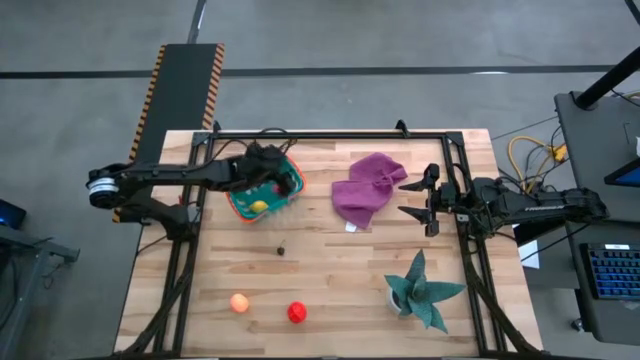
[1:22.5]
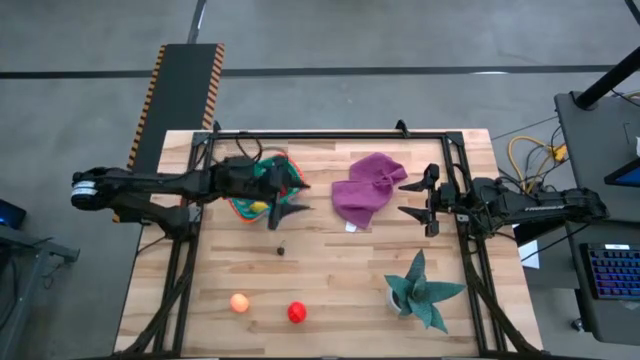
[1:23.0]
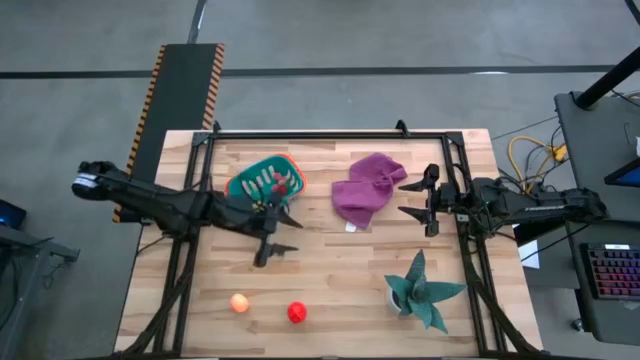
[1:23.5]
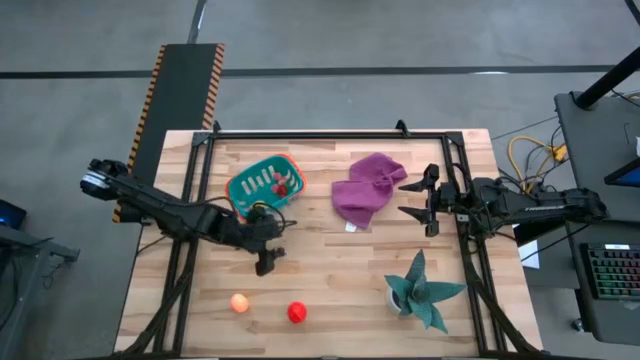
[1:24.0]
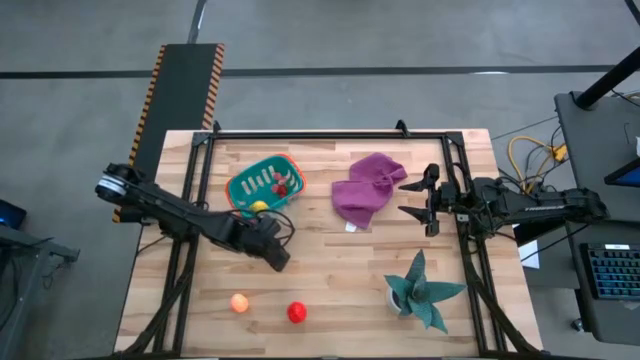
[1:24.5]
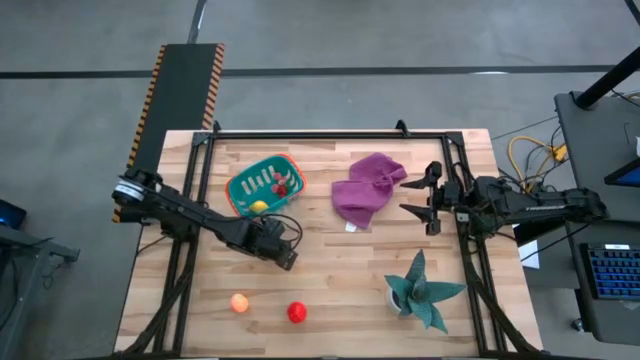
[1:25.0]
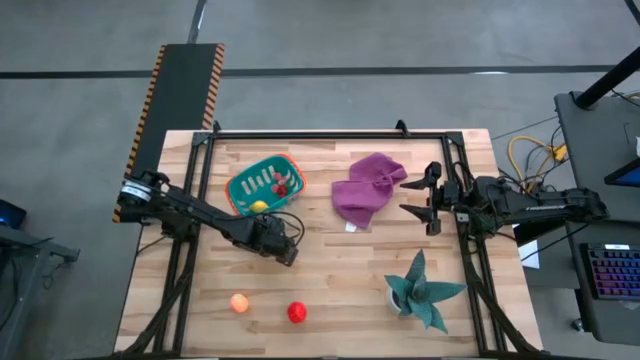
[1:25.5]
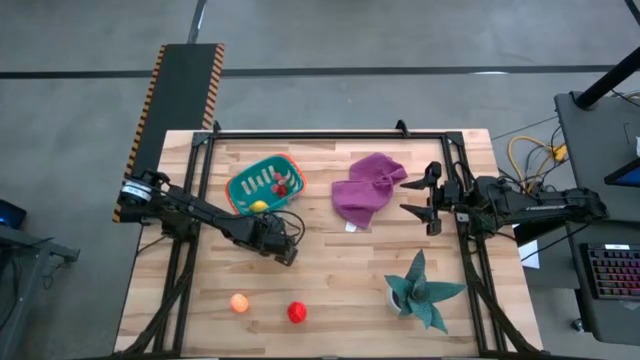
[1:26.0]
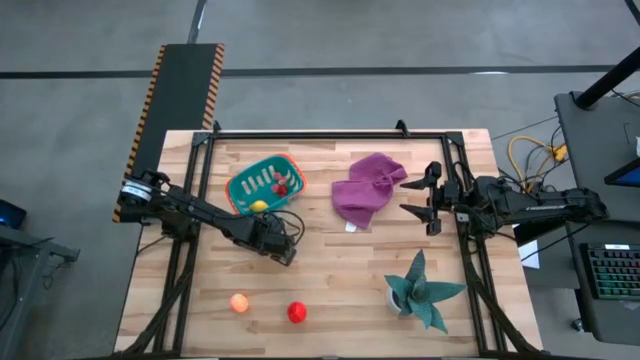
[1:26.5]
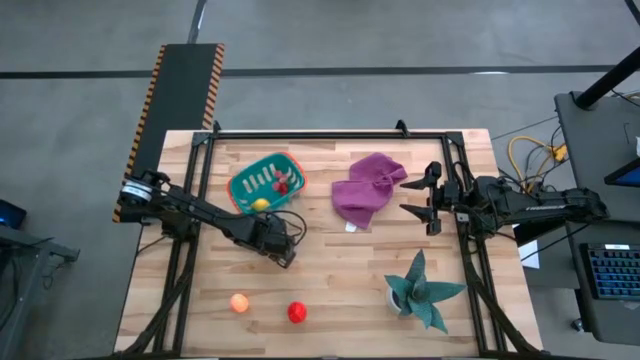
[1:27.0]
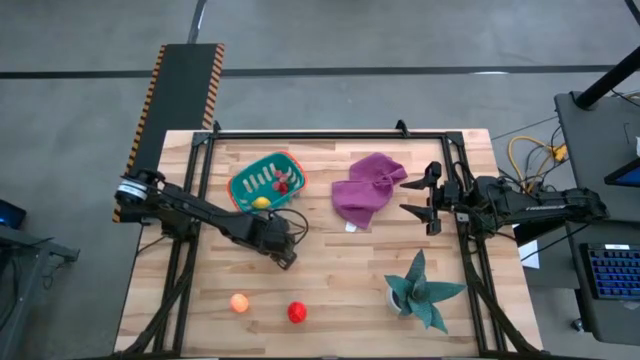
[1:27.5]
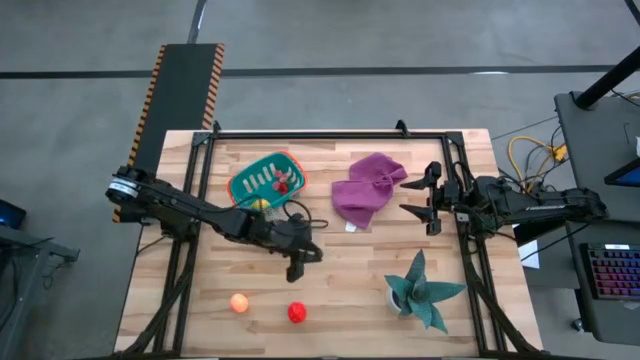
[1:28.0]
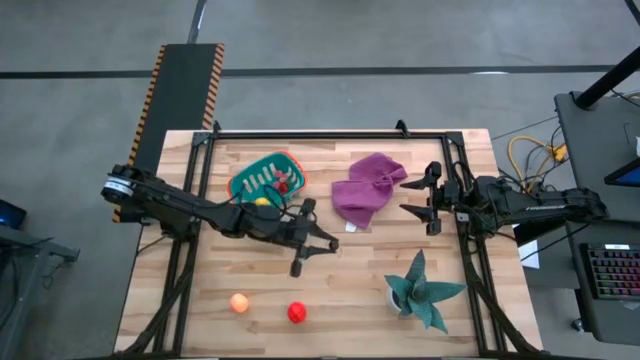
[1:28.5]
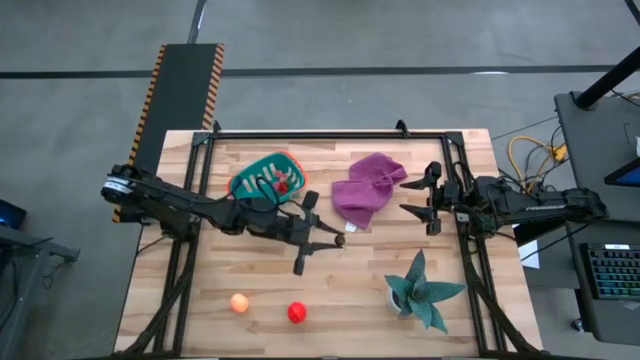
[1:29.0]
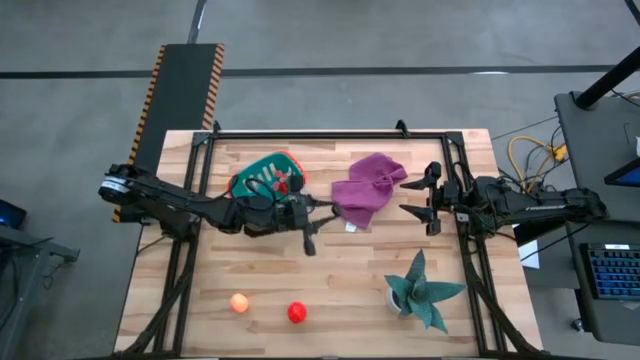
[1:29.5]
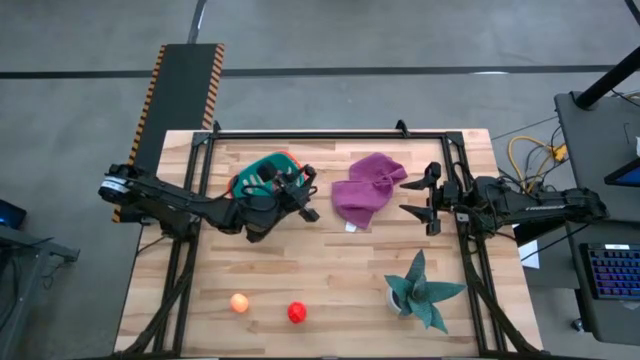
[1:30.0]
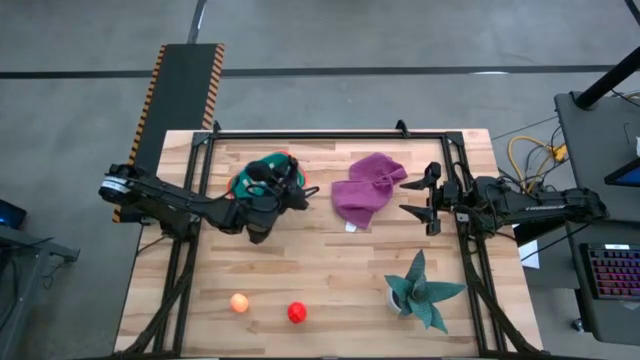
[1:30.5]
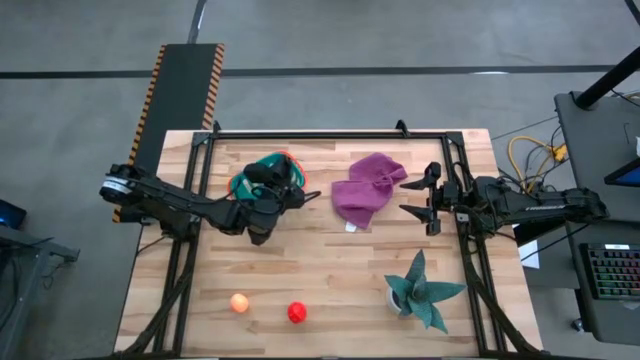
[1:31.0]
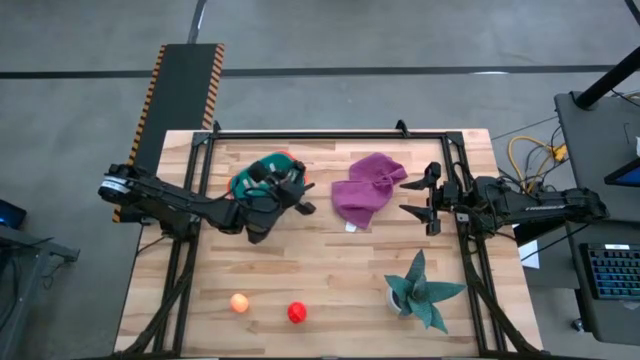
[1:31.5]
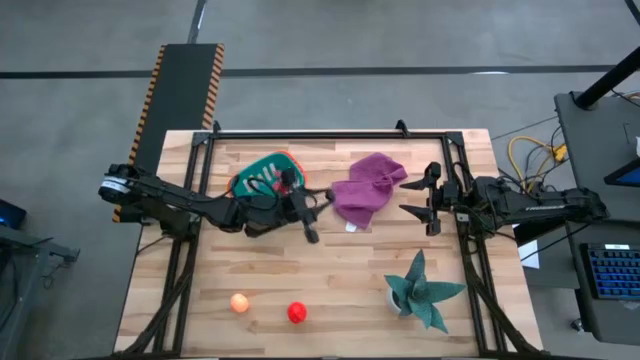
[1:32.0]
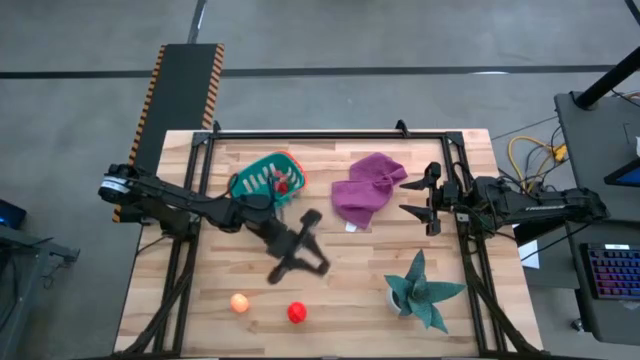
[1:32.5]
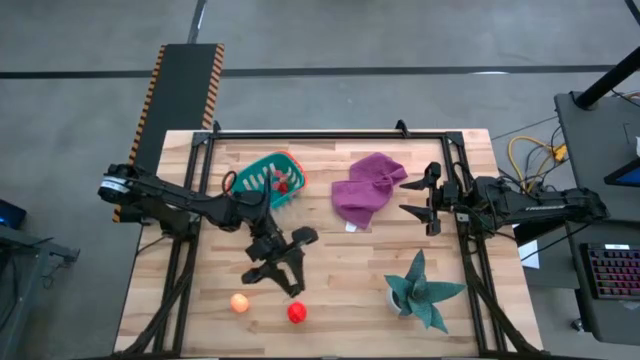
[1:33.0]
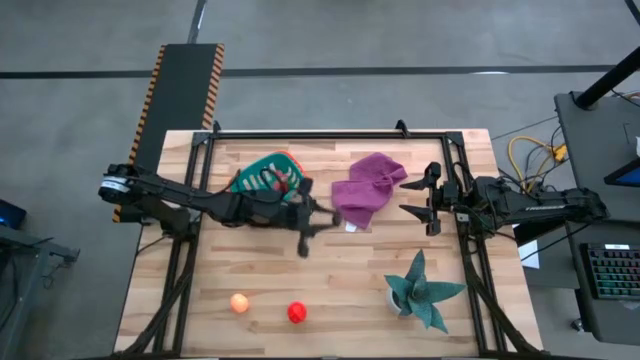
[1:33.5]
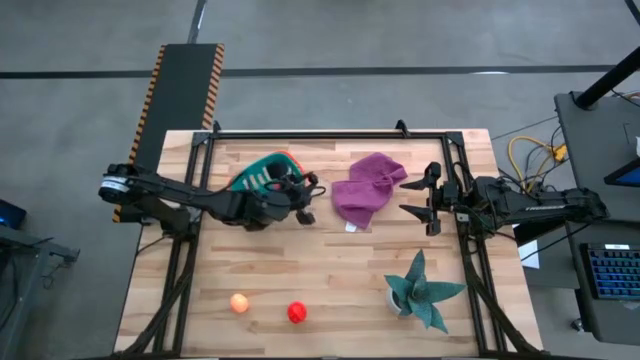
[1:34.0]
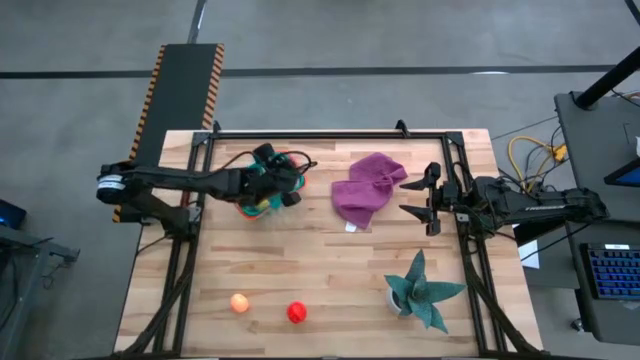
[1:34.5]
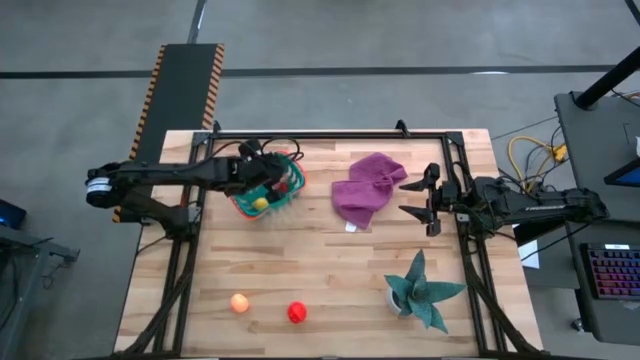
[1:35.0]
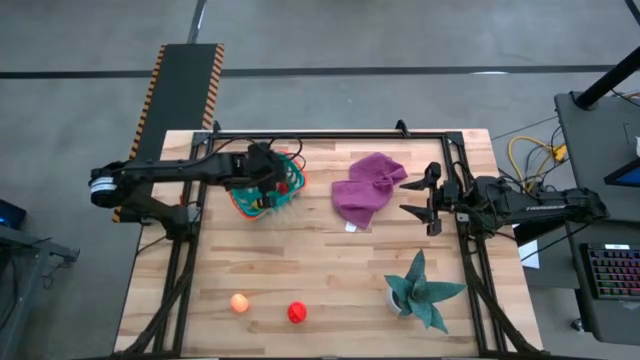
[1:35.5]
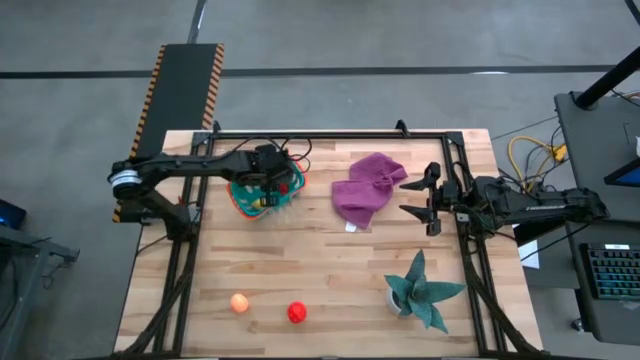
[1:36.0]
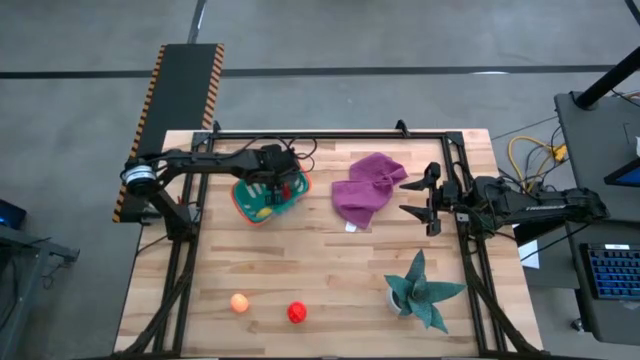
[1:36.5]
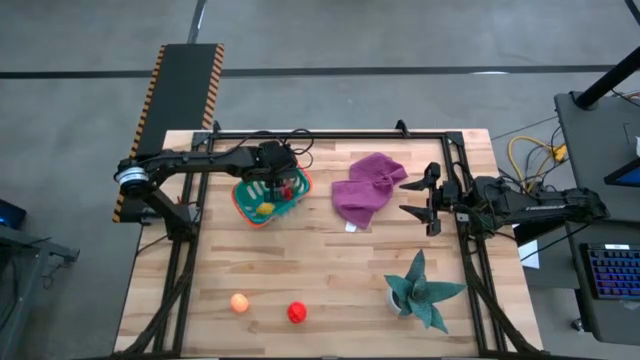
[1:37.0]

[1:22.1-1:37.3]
Task: Pick and placing Produce into tupperware
Put the black cherry into the blue basket

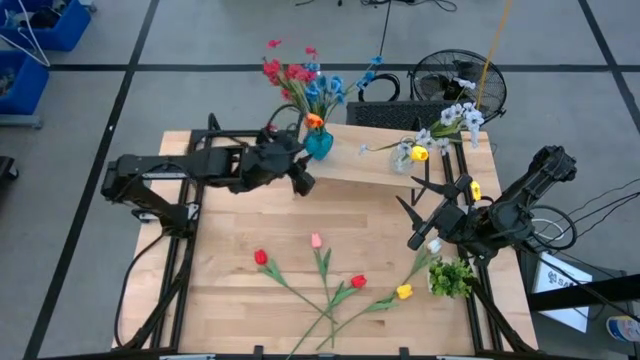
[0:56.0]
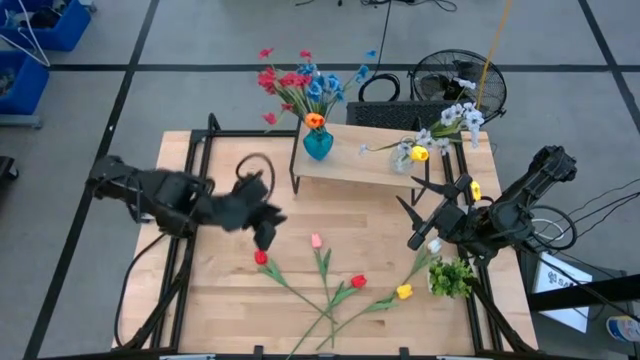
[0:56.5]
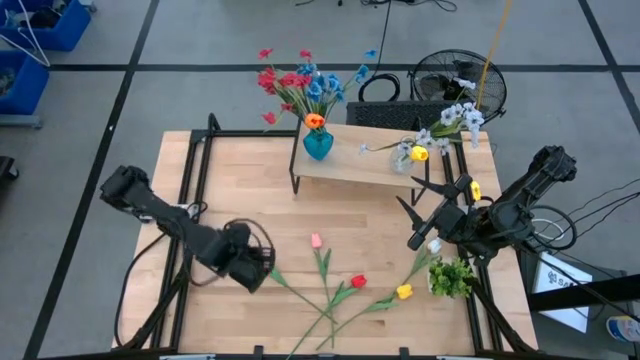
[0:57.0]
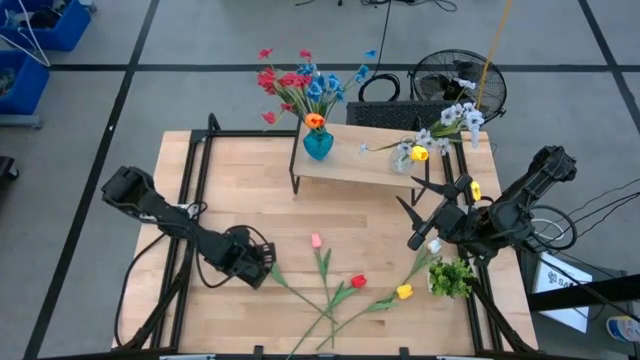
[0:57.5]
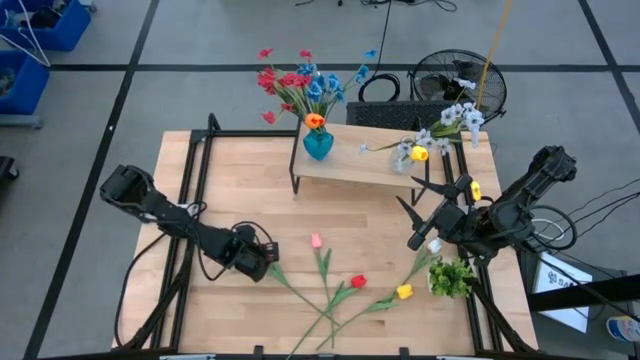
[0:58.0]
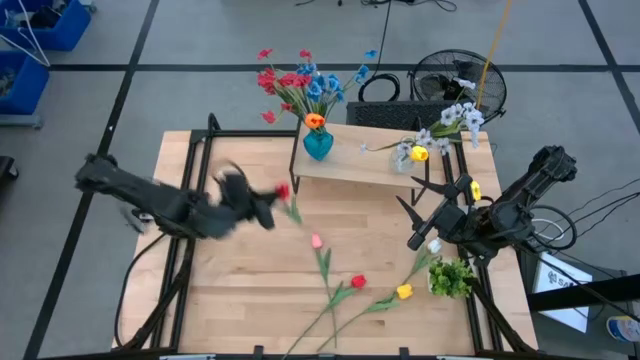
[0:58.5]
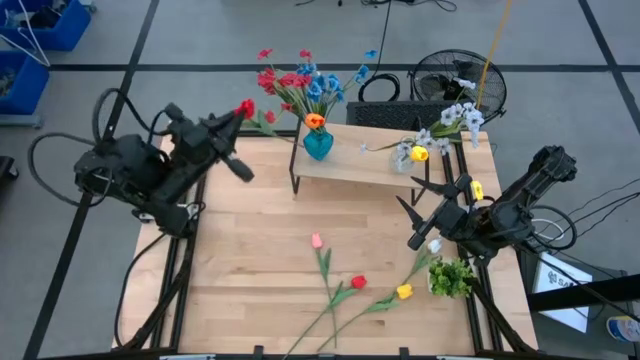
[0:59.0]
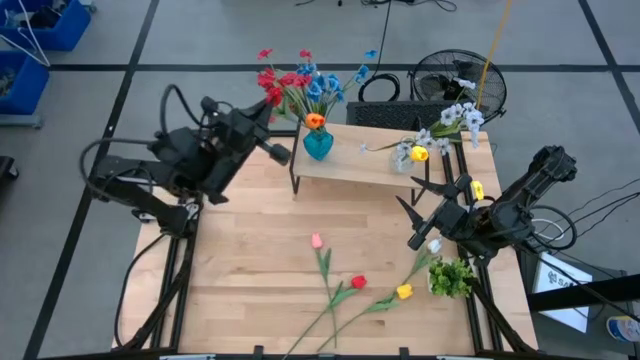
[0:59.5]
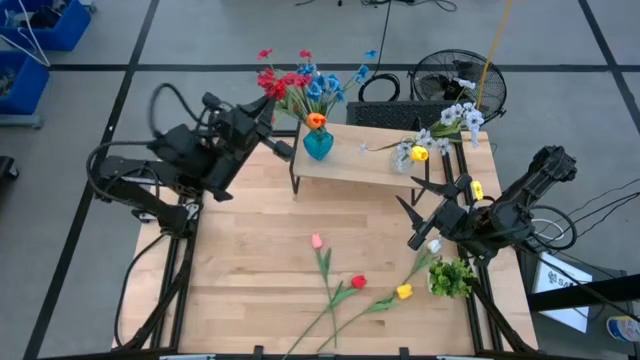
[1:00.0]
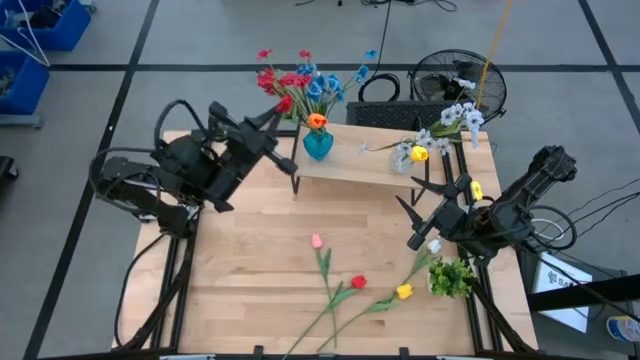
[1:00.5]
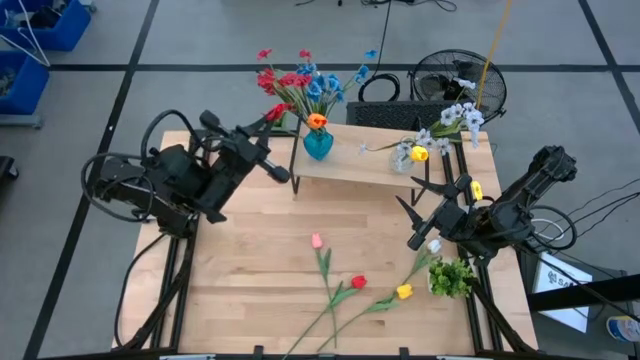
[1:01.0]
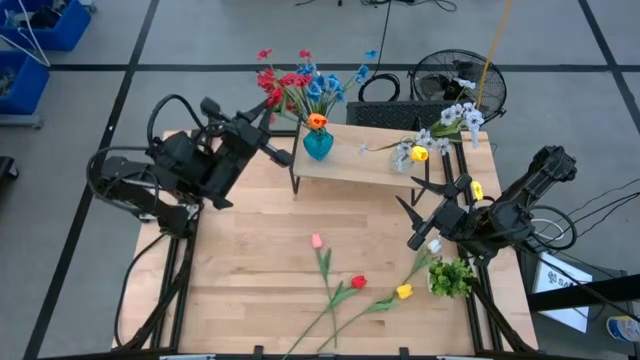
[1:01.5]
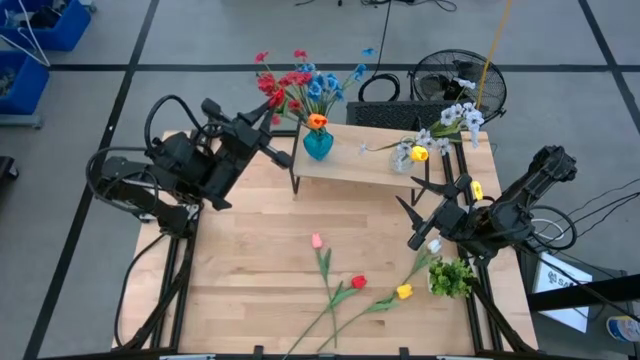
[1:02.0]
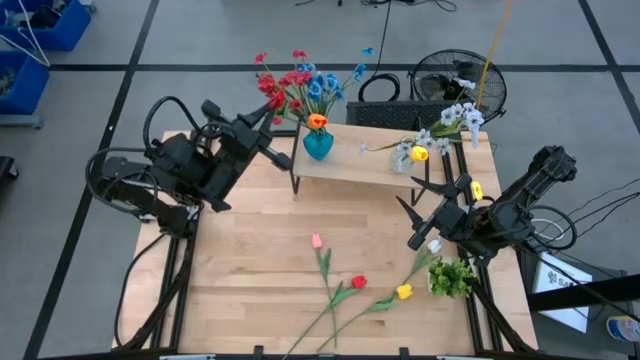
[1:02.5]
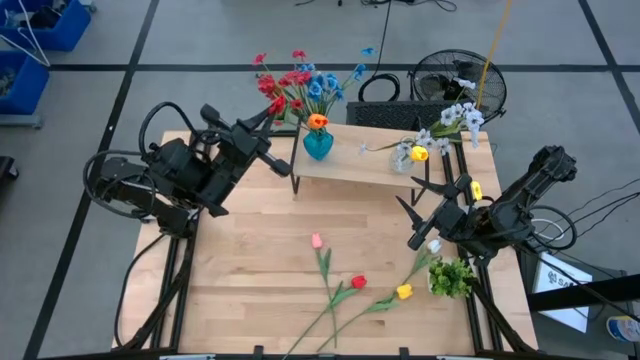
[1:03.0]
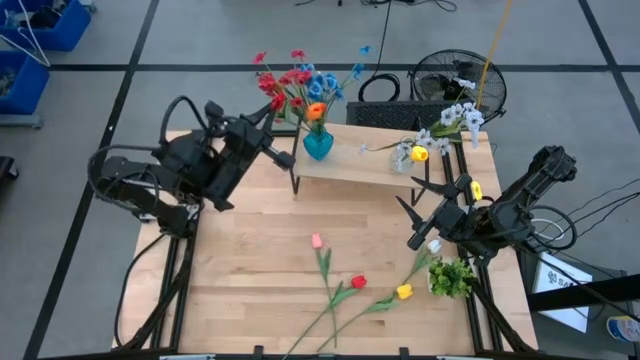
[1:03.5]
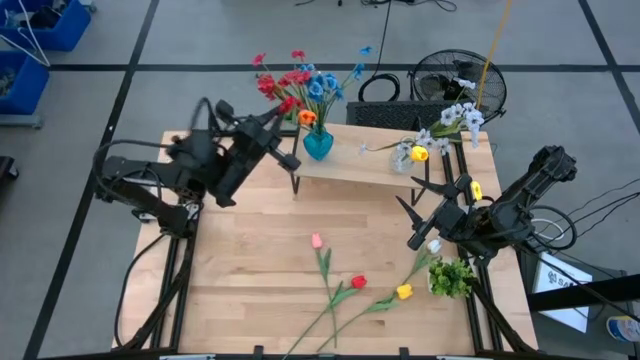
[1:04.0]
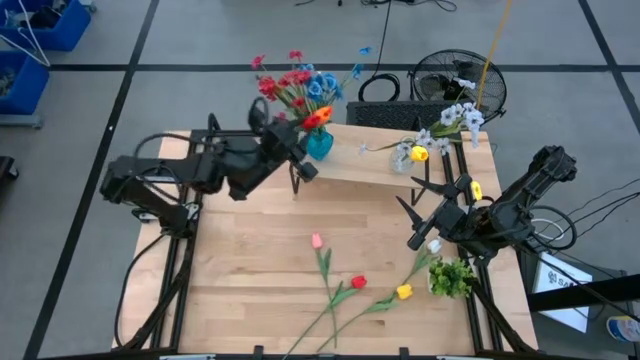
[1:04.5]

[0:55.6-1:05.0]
Task: Pick and place flowers into a vace then onto a shelf
Put the left red tulip into the blue vase on the shelf
